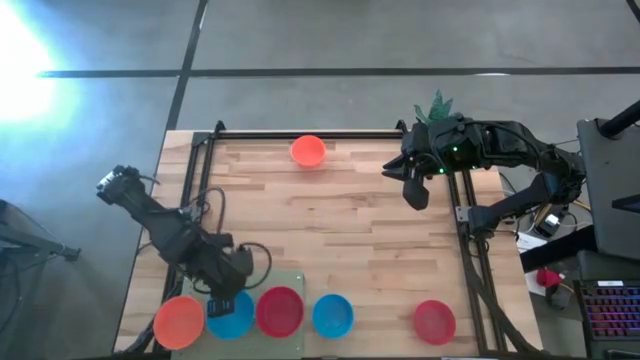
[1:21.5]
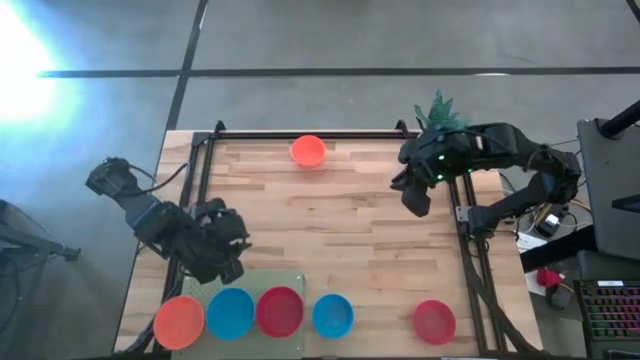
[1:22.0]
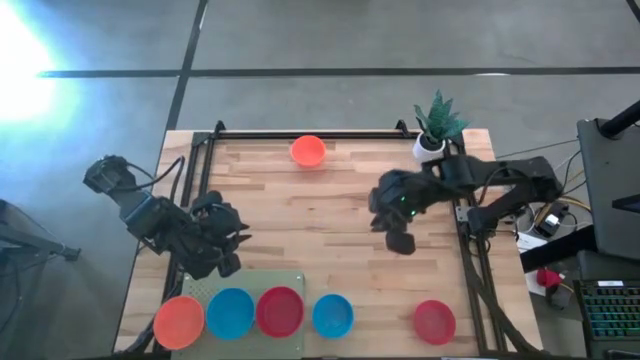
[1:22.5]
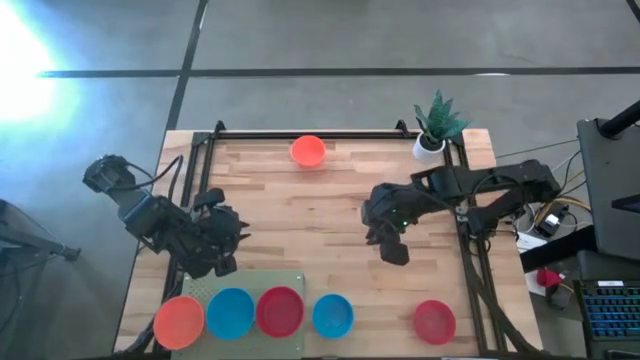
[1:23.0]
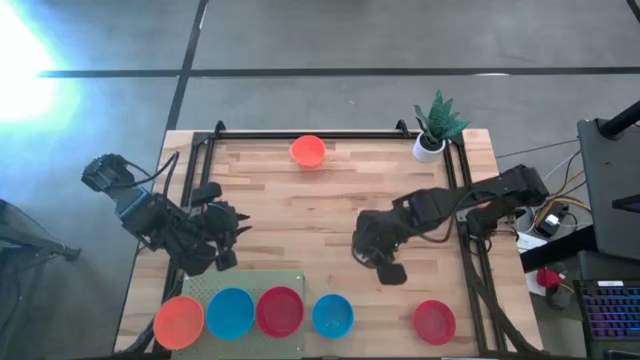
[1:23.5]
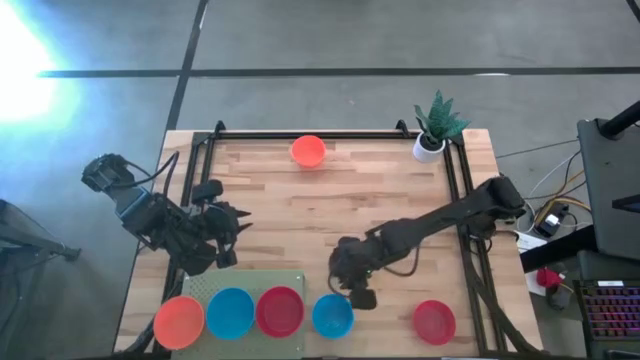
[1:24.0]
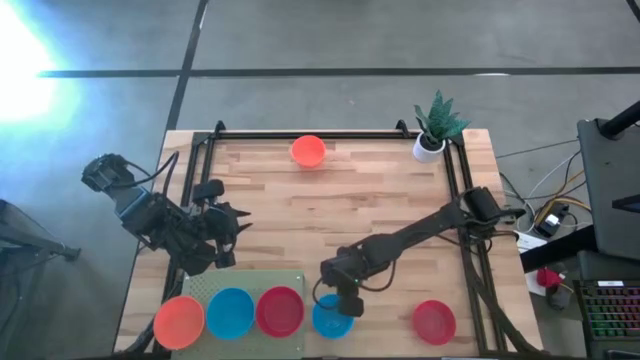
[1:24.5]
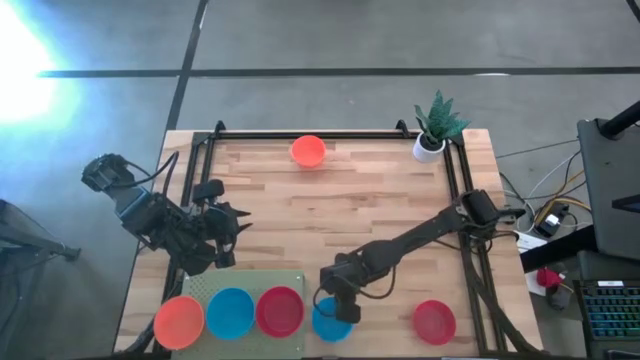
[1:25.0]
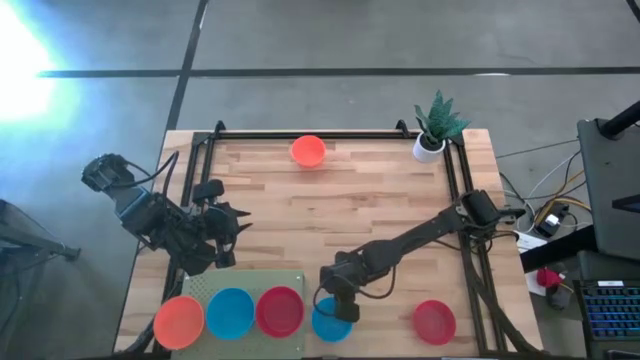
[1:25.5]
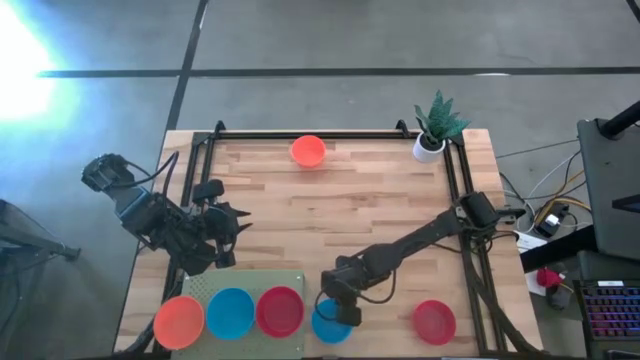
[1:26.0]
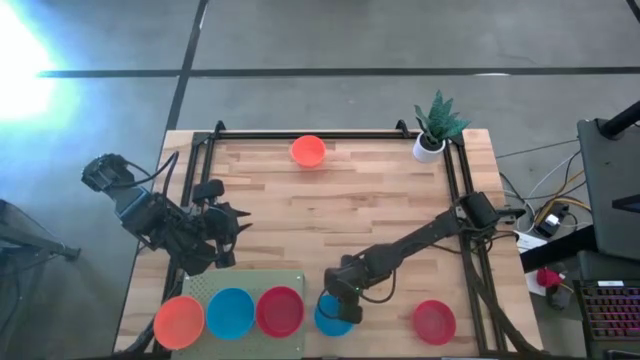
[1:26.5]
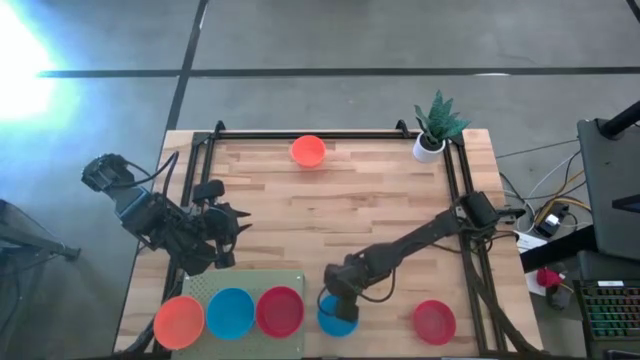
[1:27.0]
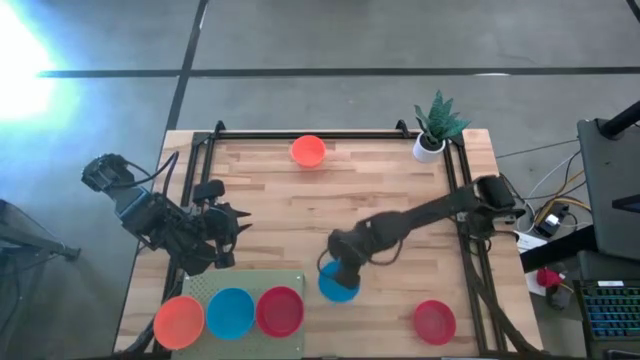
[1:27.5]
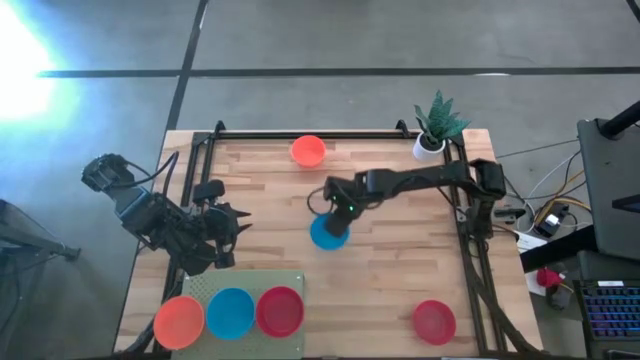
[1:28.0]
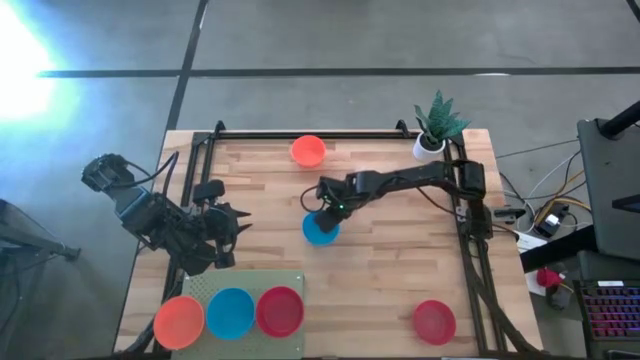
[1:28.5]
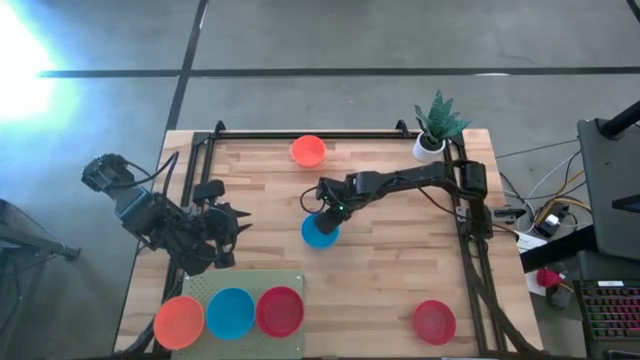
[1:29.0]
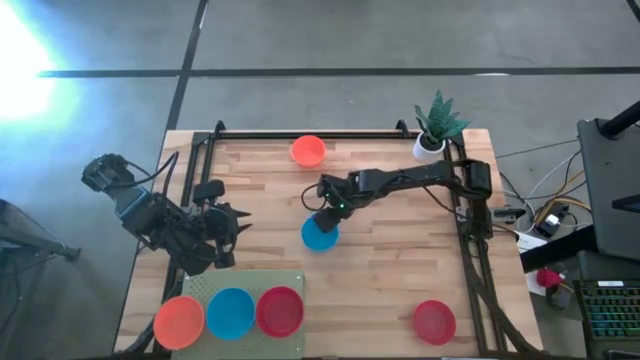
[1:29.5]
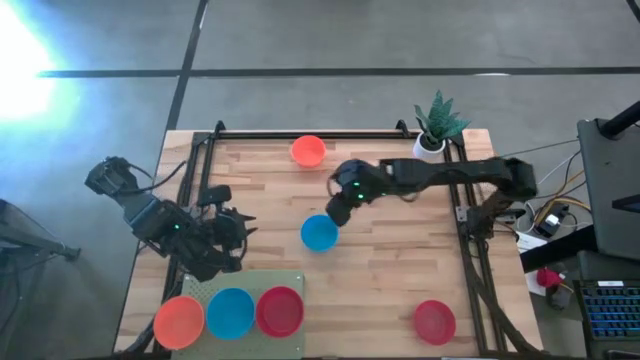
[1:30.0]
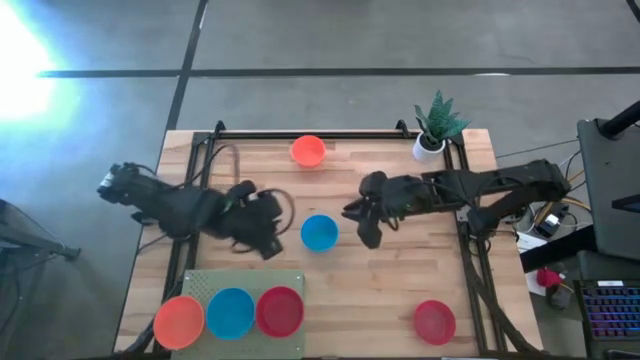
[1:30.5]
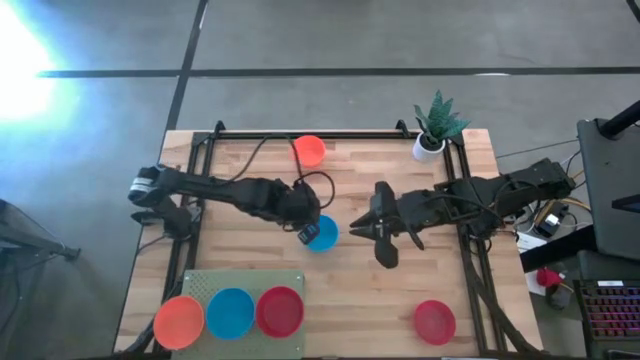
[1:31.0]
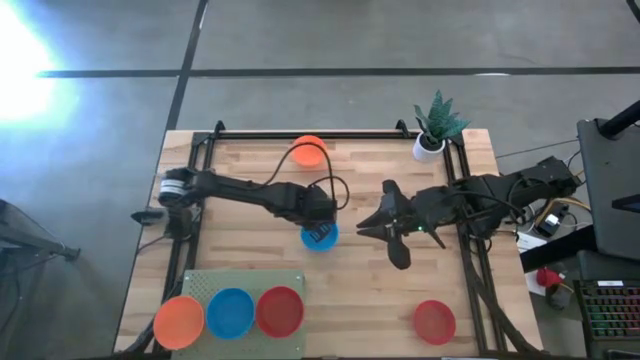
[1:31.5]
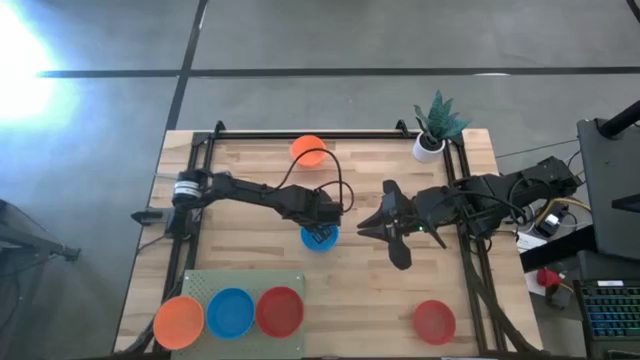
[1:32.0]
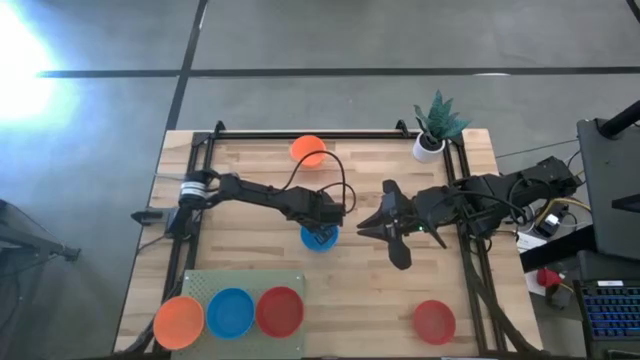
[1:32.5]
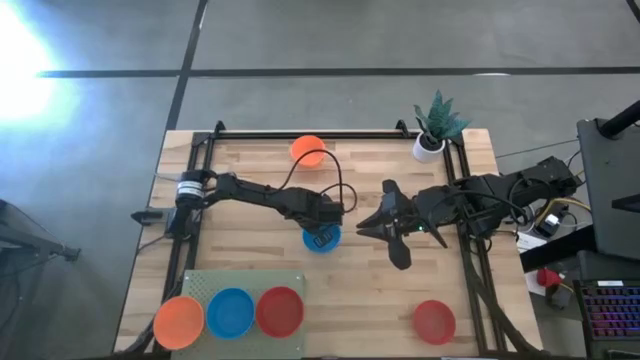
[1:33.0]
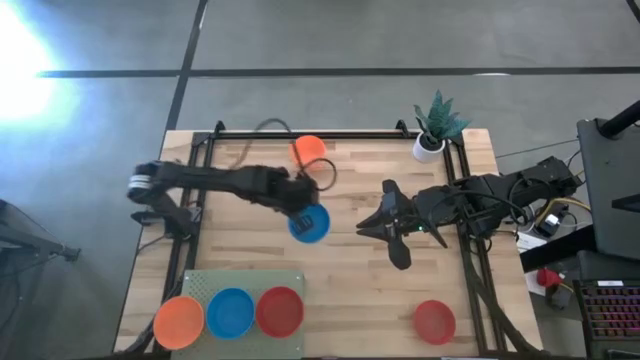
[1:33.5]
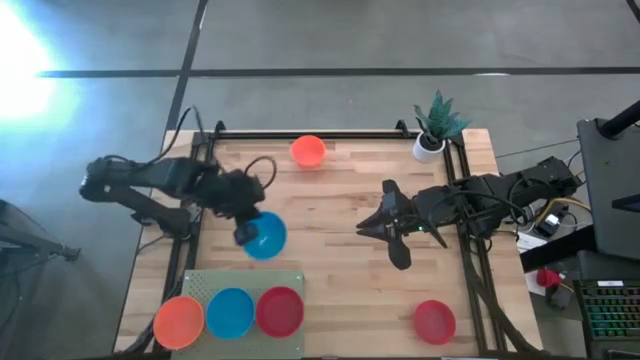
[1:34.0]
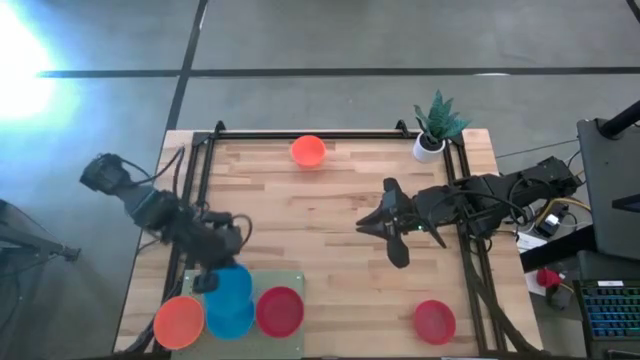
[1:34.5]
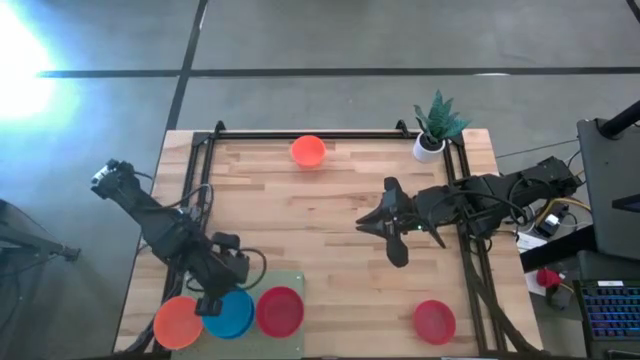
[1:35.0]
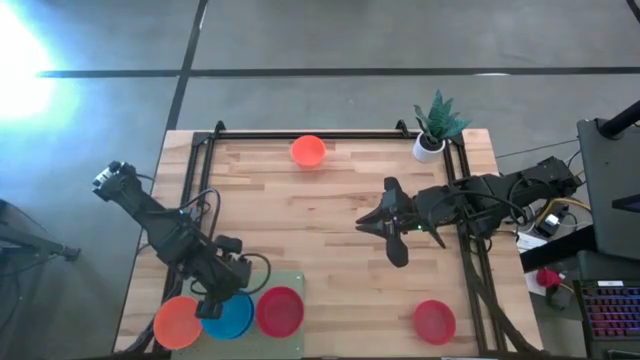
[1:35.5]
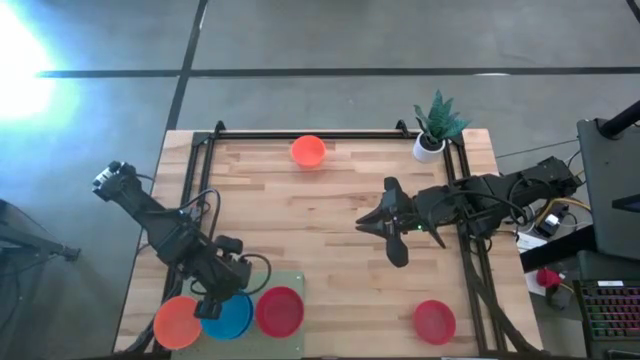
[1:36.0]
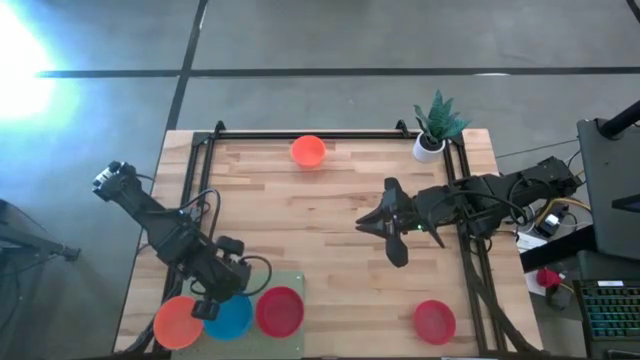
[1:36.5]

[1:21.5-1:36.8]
Task: Pick & Place Mini bowls
Stack the blue bowl on the blue bowls on the shelf

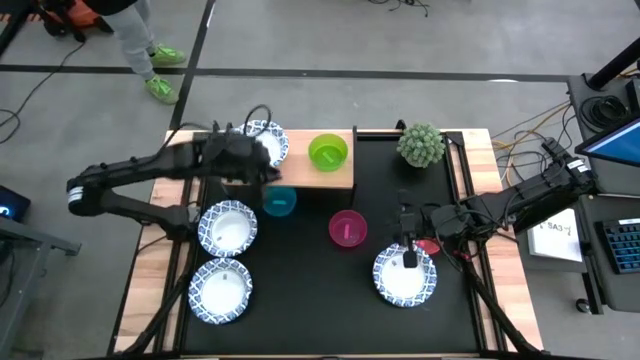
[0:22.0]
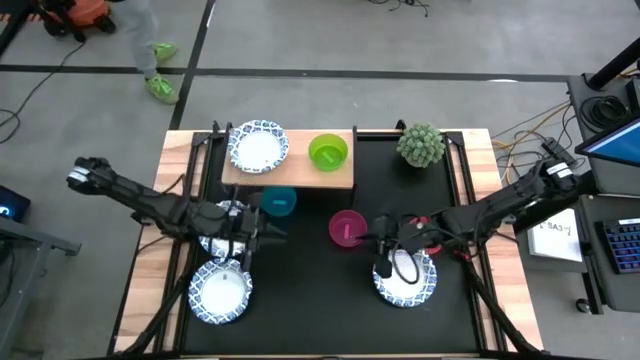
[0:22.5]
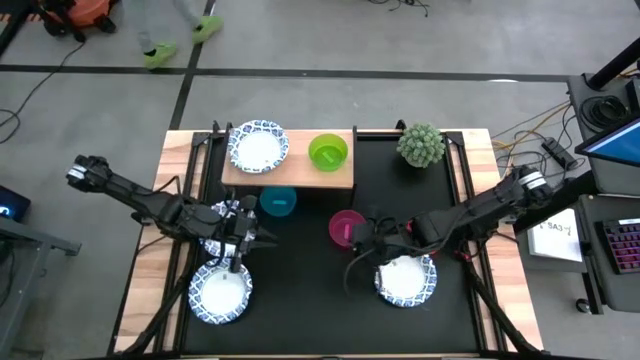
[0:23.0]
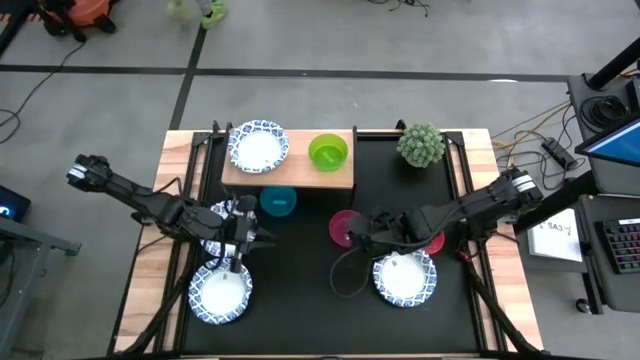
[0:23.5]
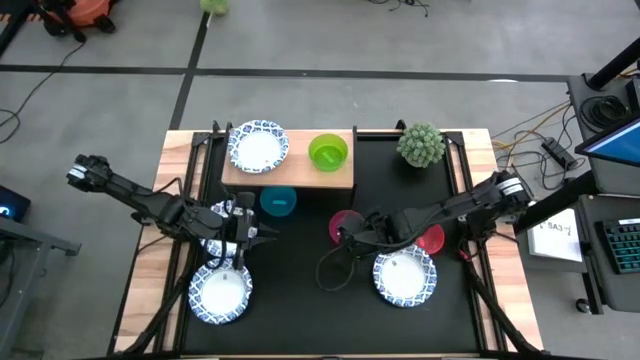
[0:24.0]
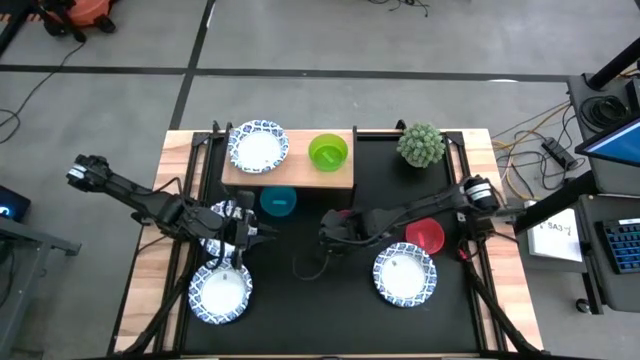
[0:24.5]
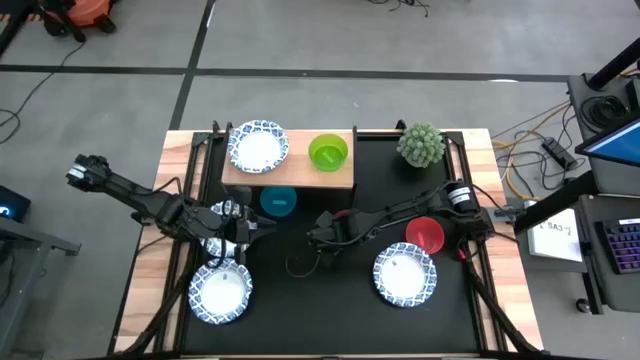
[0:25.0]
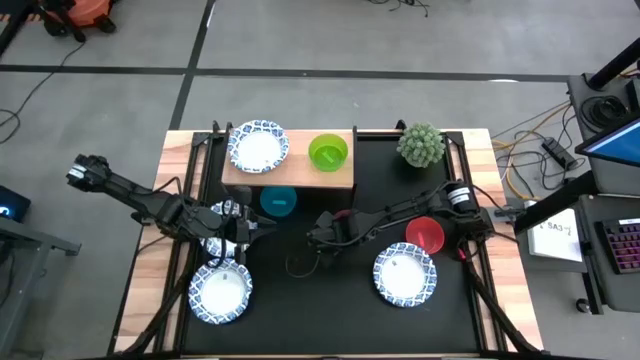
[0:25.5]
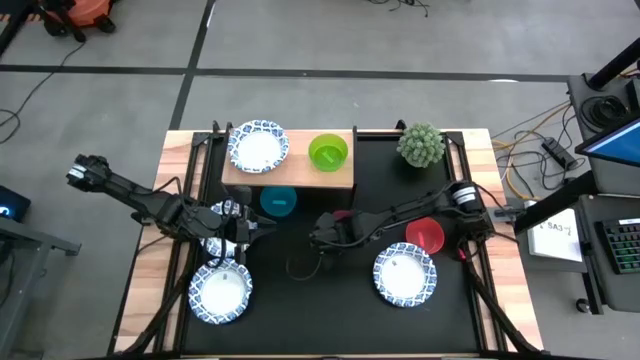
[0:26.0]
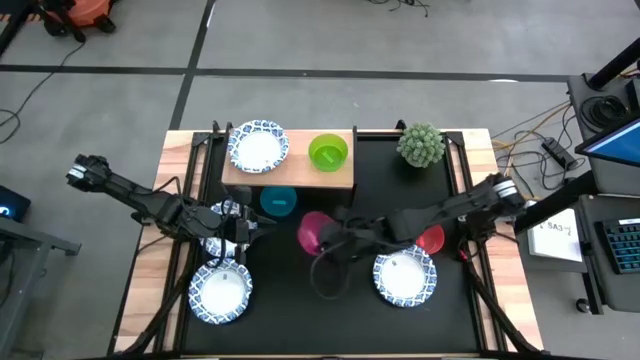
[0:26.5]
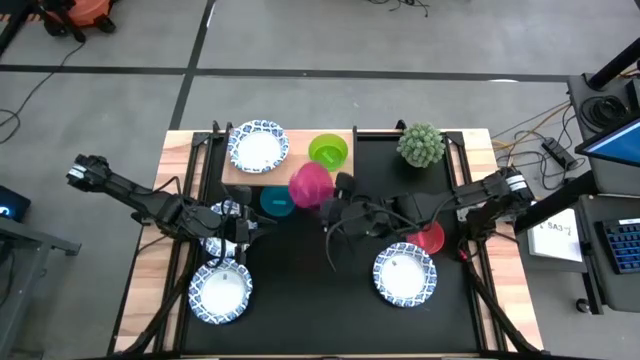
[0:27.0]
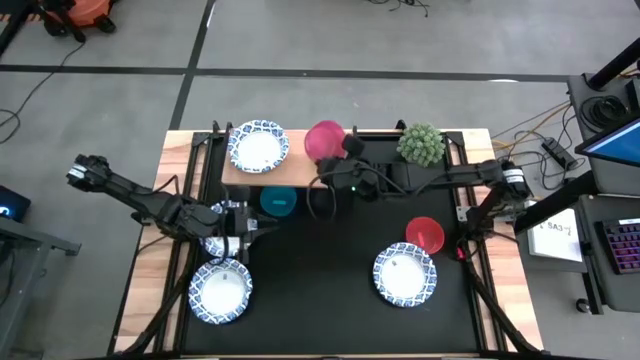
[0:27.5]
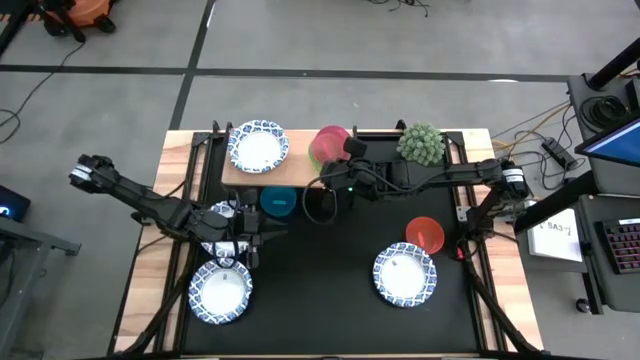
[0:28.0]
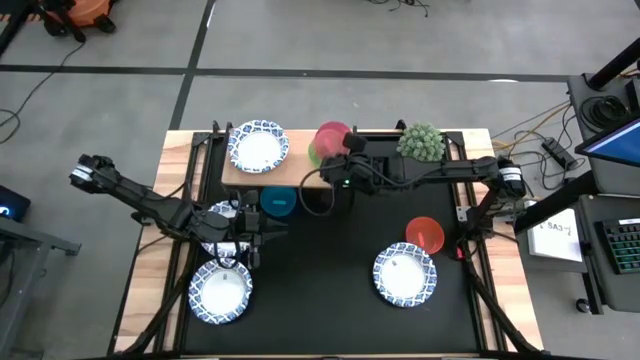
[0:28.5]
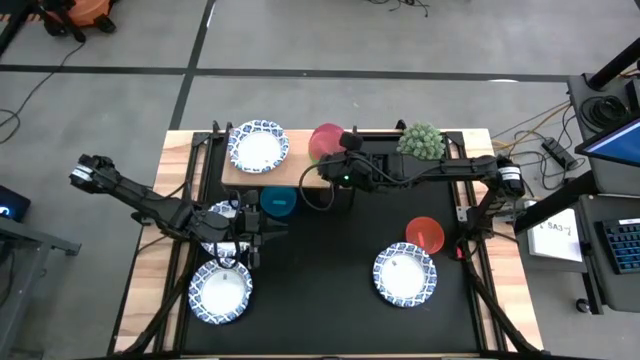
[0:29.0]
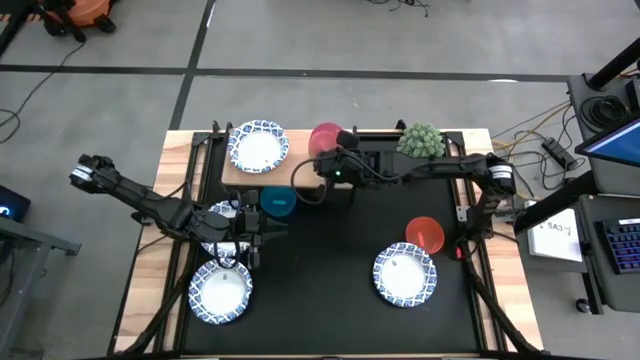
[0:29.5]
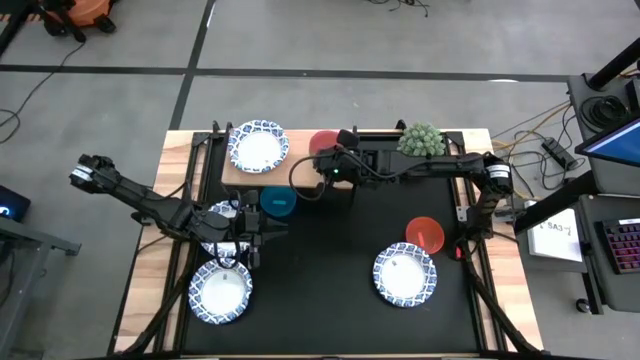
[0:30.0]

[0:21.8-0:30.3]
Task: Place and stack bowls onto a shelf
Stack the pink bowl on top of the green bowl on the shelf
